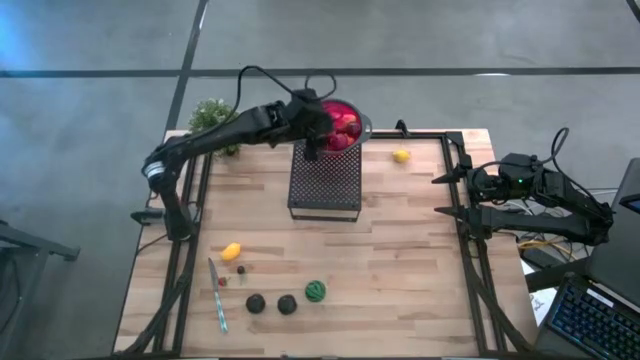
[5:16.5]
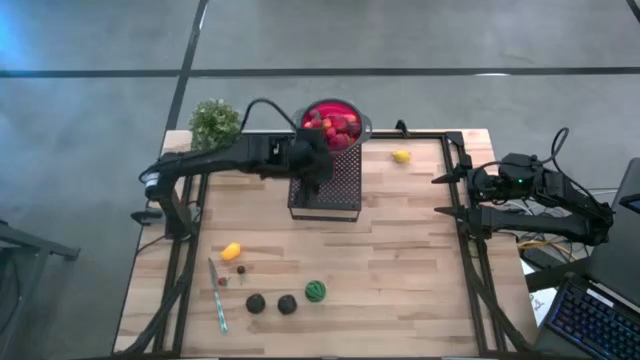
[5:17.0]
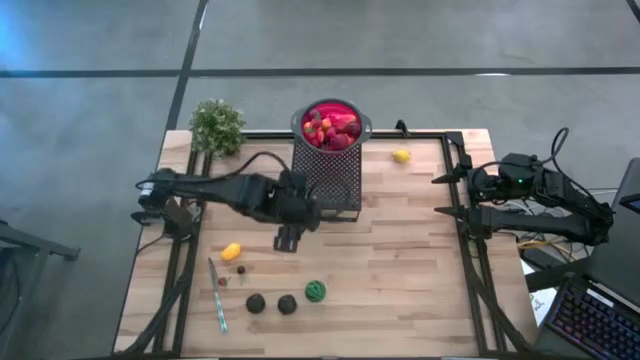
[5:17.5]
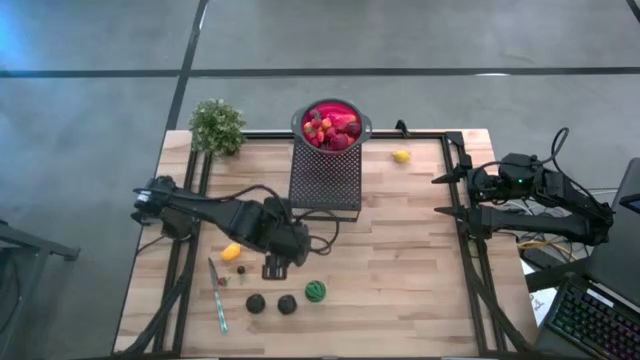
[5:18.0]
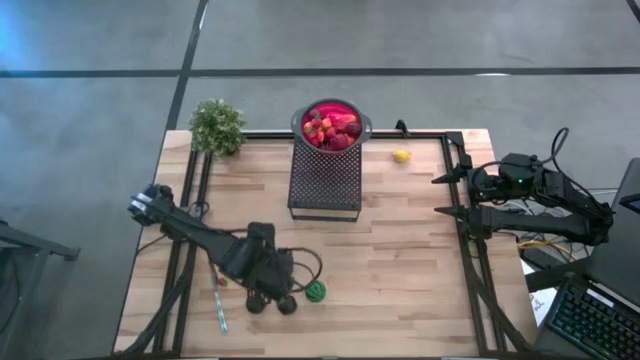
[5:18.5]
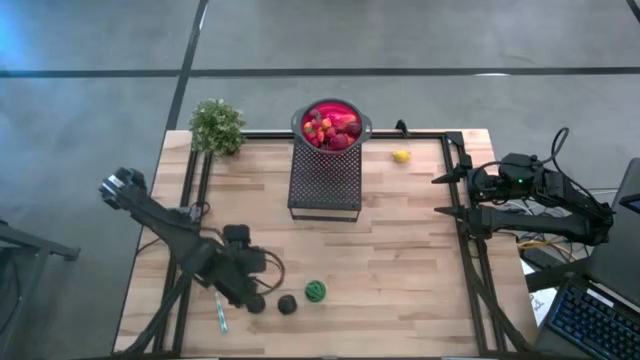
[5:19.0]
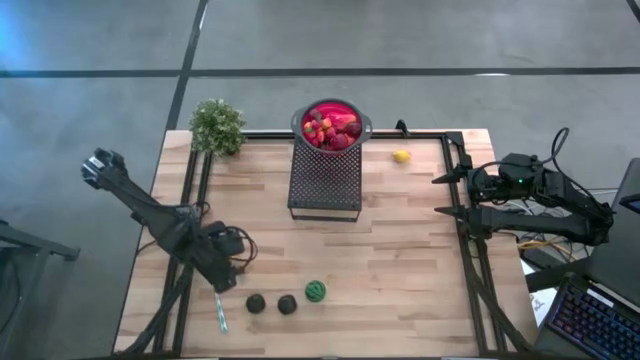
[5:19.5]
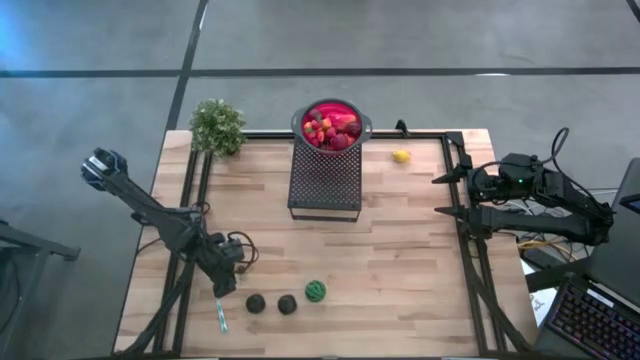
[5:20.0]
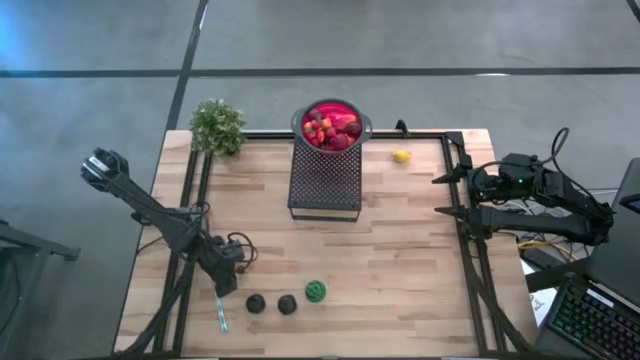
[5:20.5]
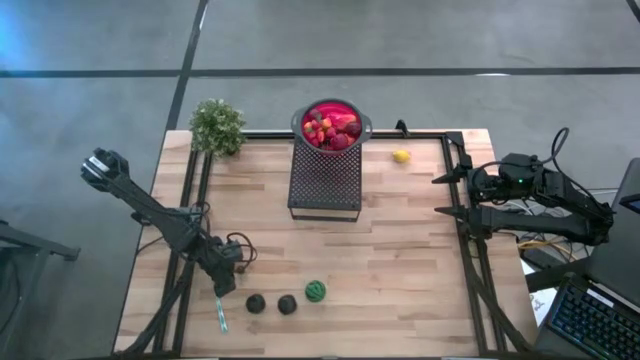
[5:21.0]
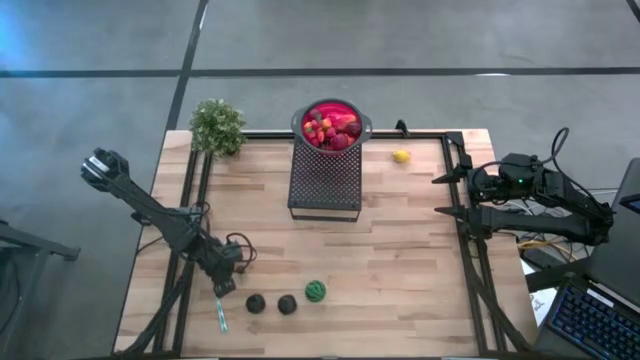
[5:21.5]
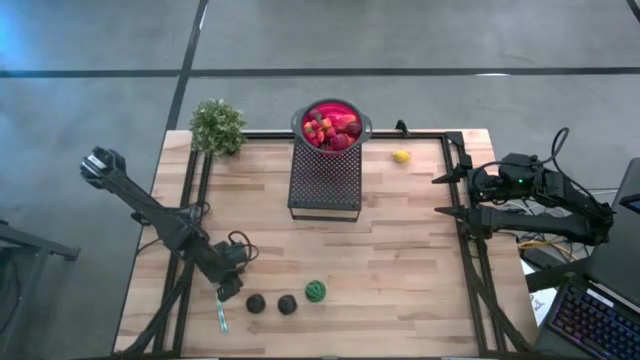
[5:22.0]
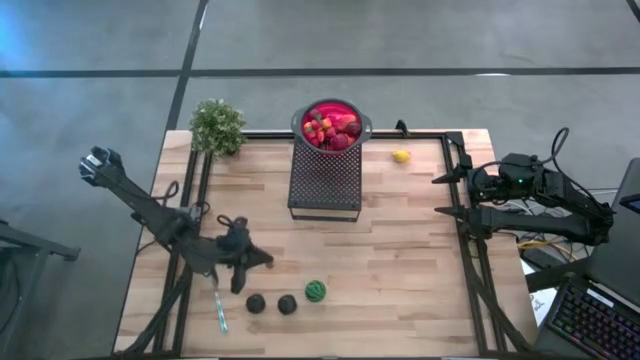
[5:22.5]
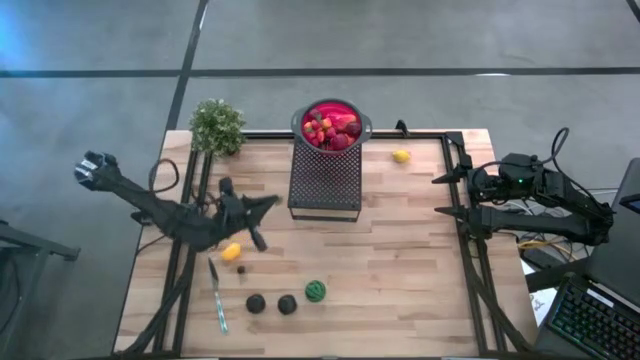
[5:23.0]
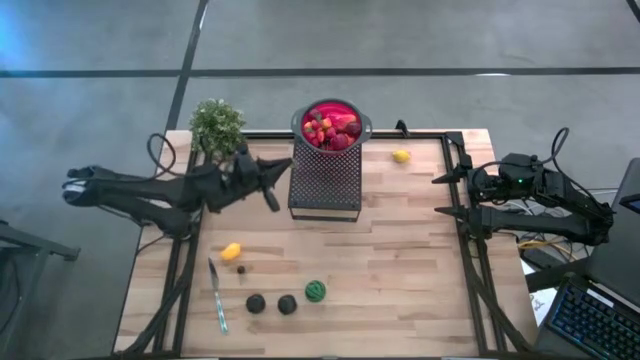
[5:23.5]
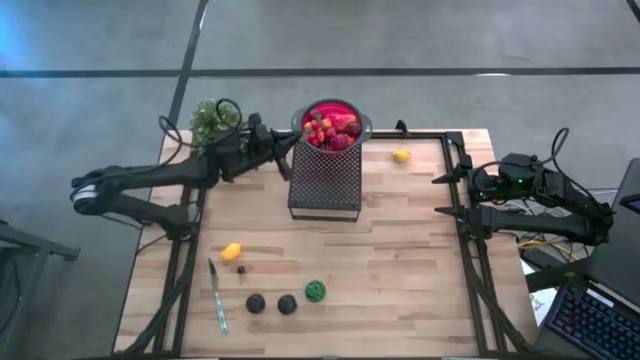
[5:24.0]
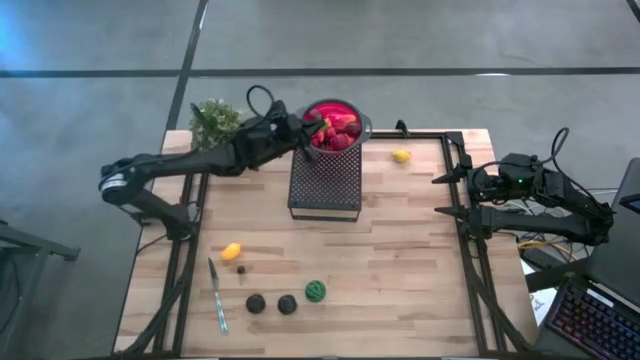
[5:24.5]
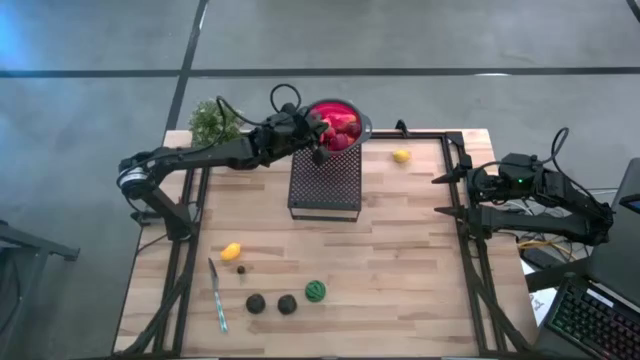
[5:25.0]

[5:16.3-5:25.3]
Task: Pick & Place Fruit
Put the strawberry into the red strainer bowl on the shelf

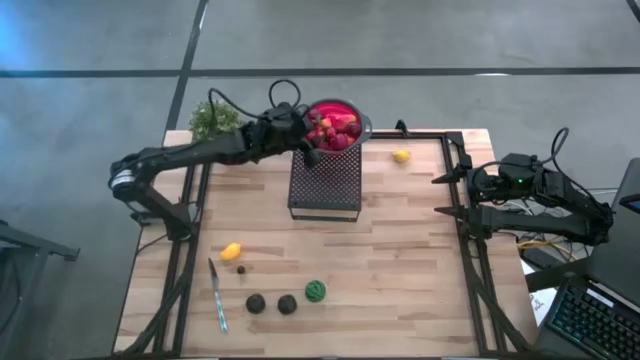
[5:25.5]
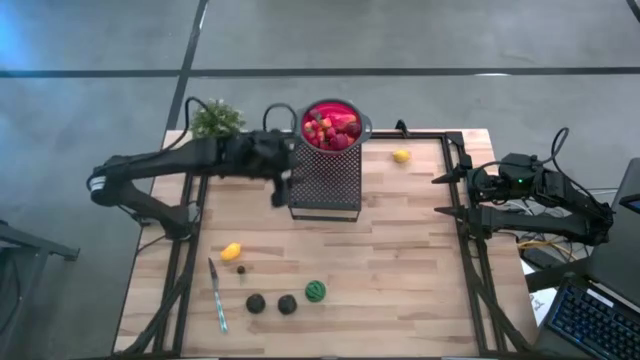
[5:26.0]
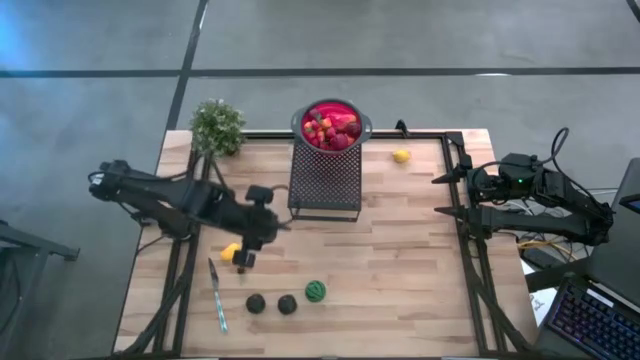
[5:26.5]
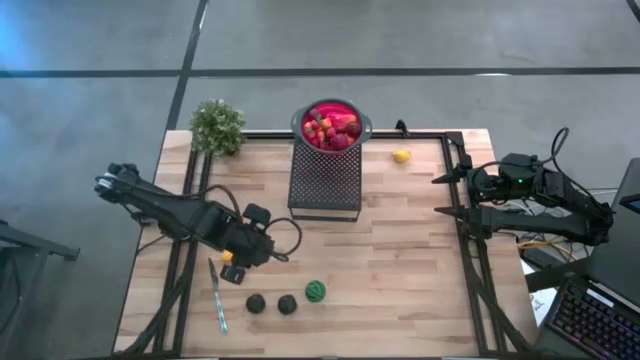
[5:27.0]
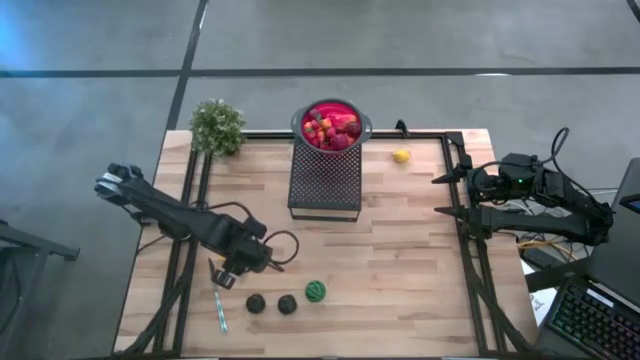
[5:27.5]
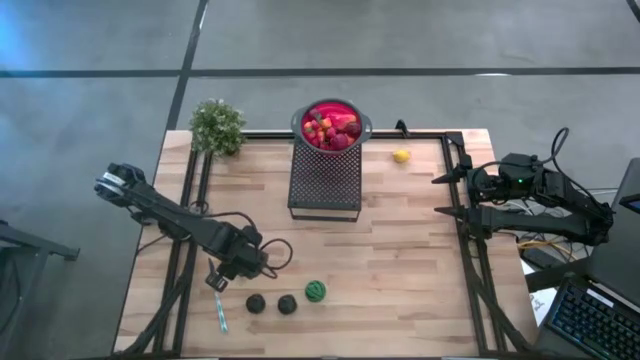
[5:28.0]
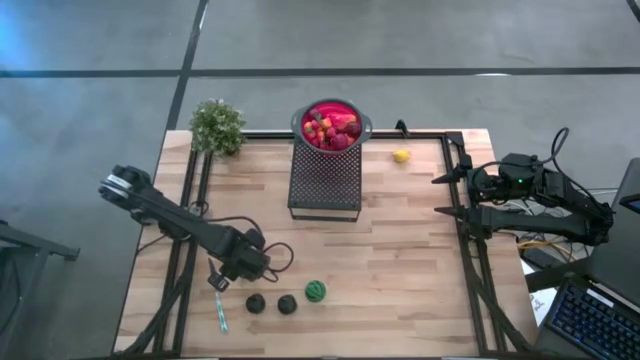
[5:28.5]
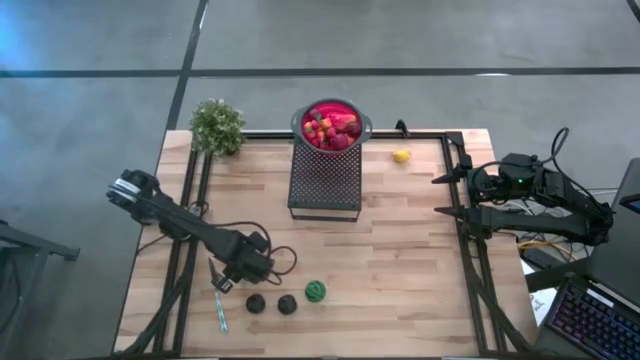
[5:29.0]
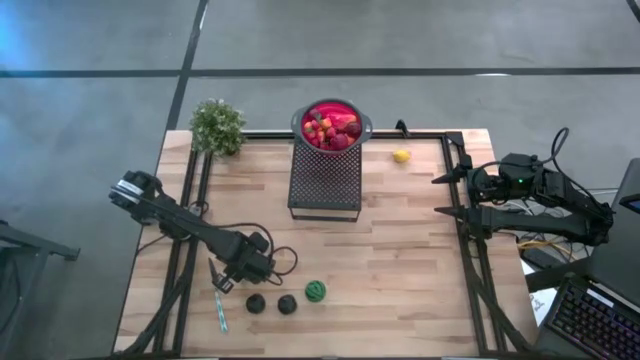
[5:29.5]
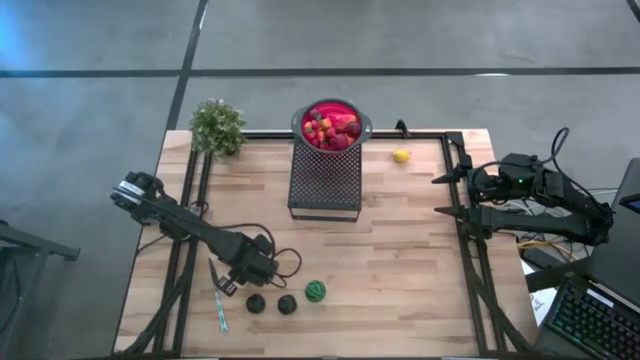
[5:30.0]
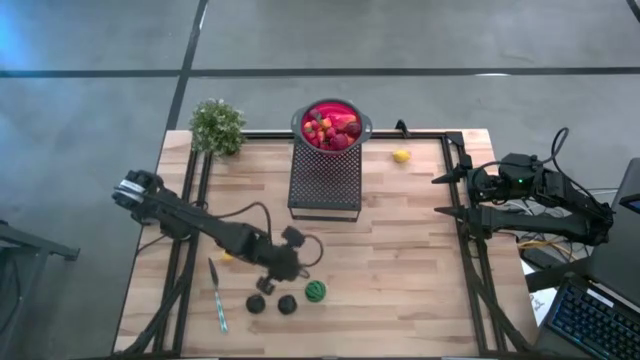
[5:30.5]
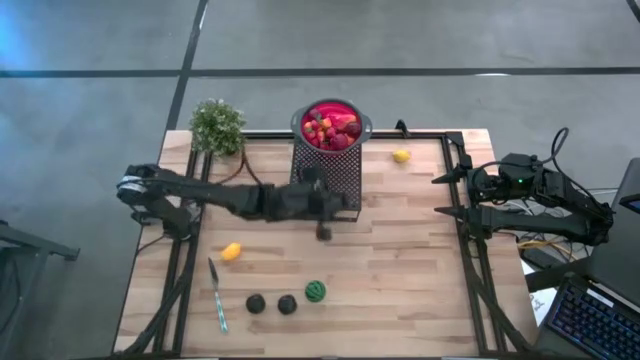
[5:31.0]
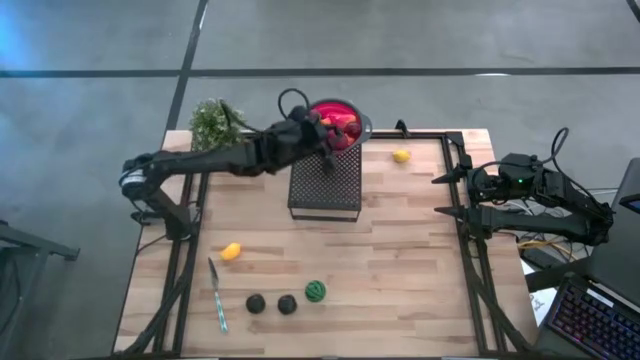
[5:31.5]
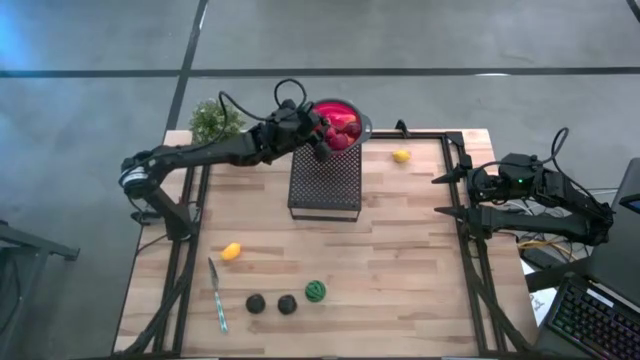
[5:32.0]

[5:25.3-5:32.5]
Put the black cherry into the red strainer bowl on the shelf

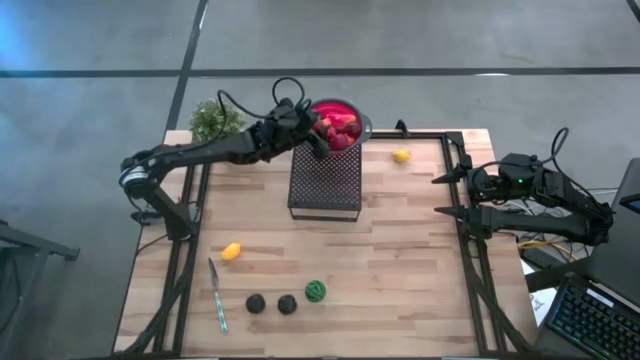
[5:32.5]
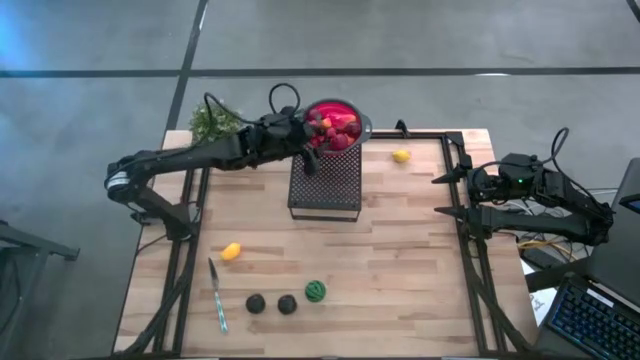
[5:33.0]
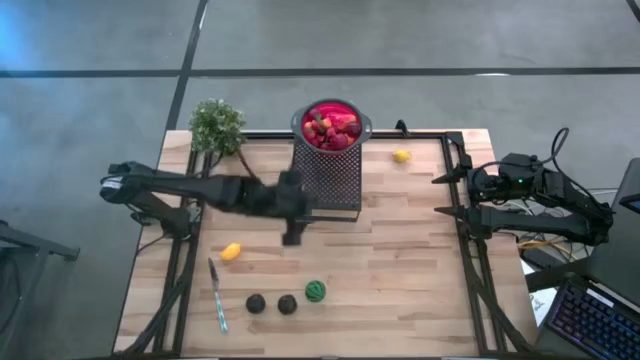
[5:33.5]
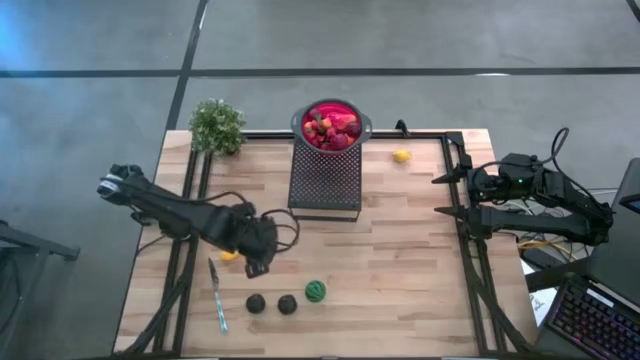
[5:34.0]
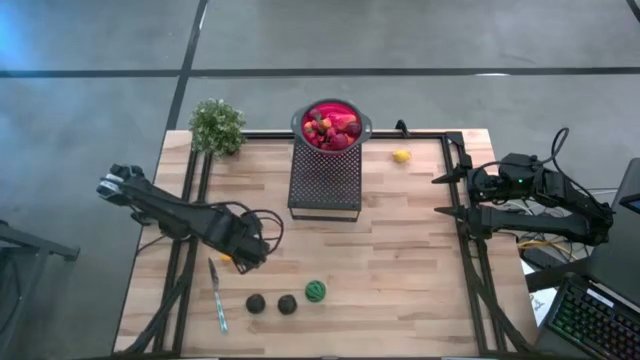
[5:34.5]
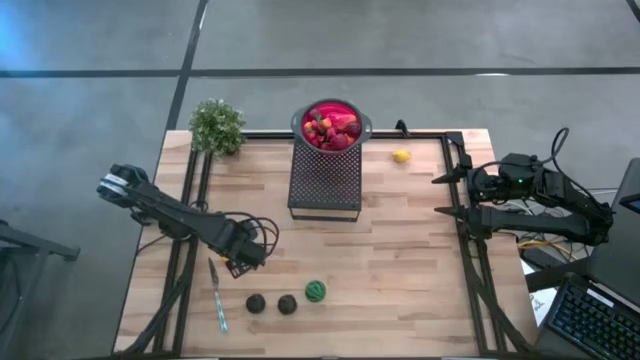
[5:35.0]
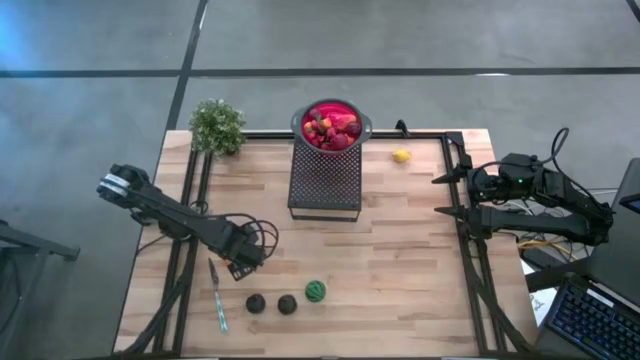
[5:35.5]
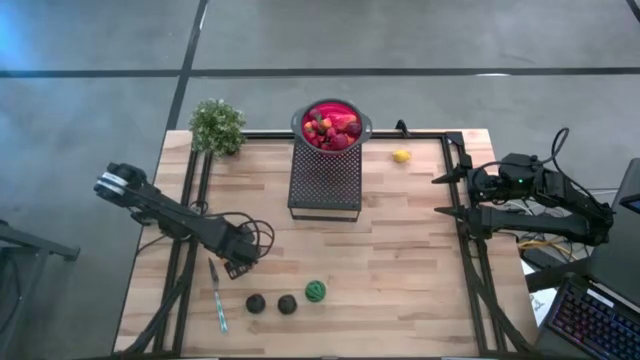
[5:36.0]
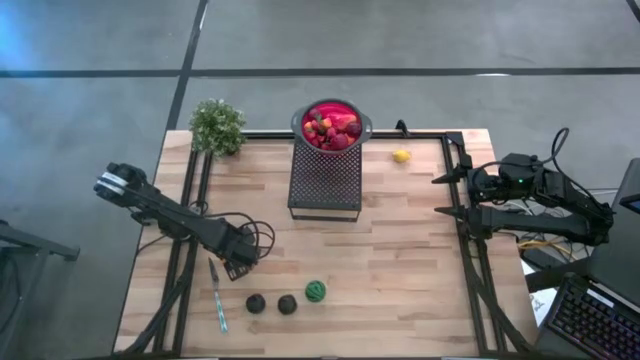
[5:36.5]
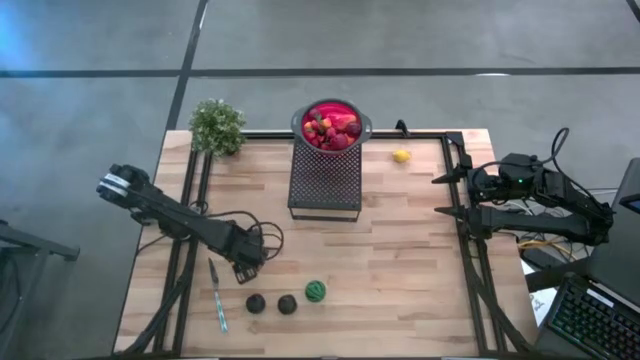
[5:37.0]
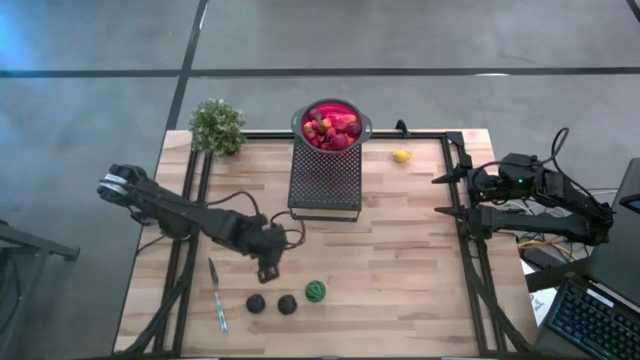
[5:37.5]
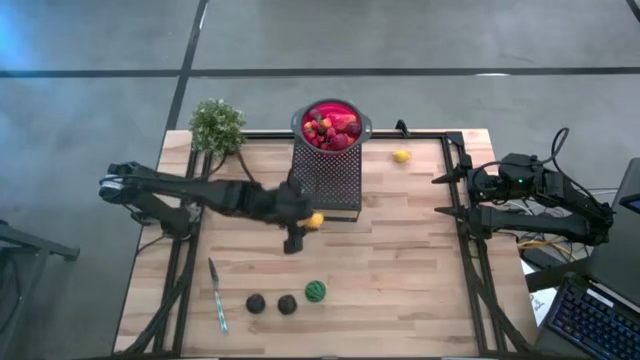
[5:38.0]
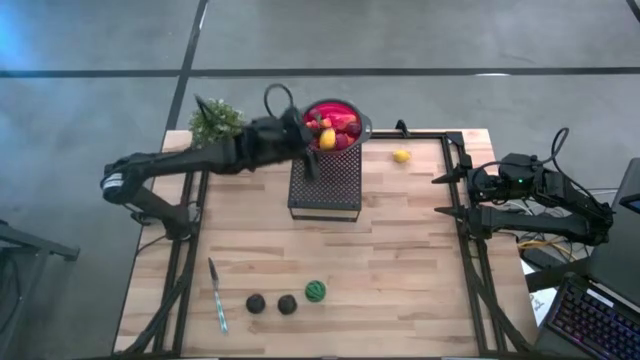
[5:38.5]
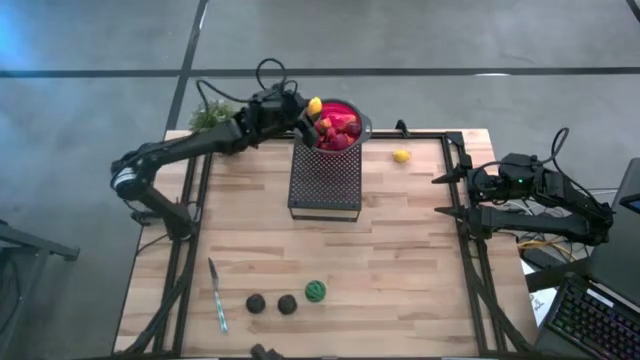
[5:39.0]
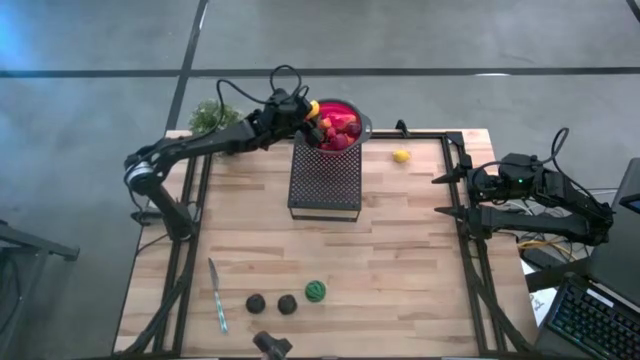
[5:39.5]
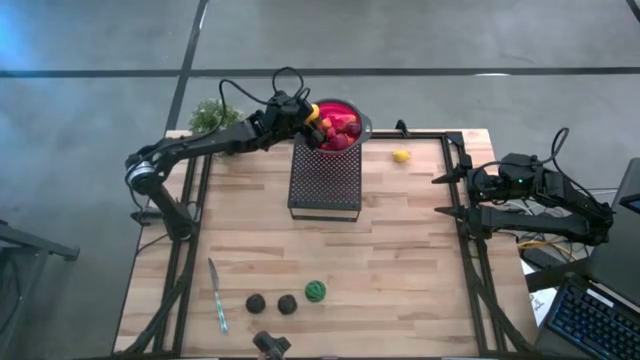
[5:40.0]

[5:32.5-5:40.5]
Put the yellow mango into the red strainer bowl on the shelf
